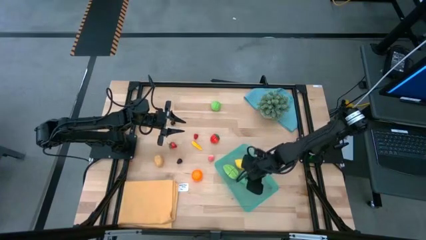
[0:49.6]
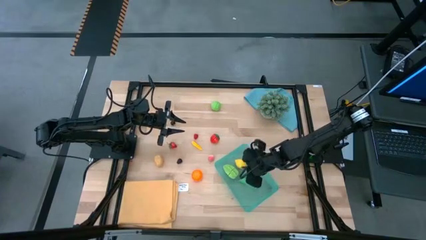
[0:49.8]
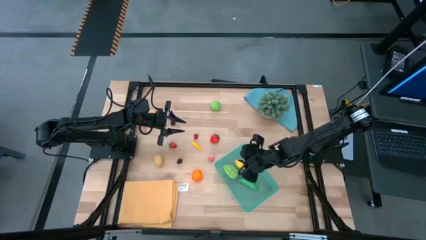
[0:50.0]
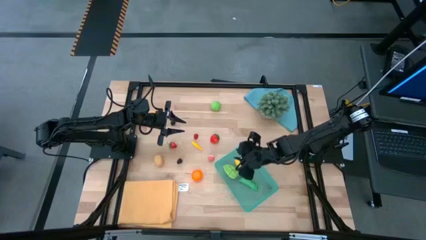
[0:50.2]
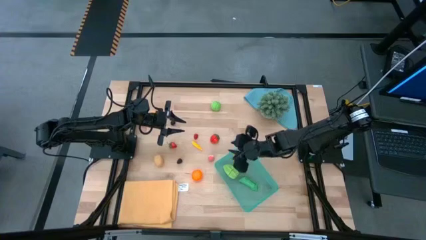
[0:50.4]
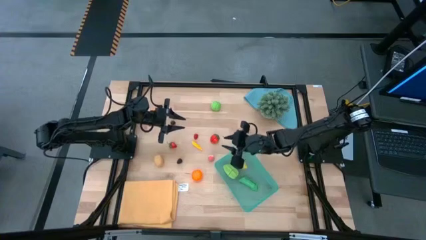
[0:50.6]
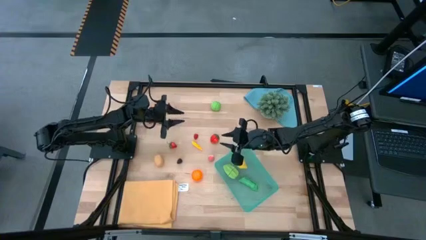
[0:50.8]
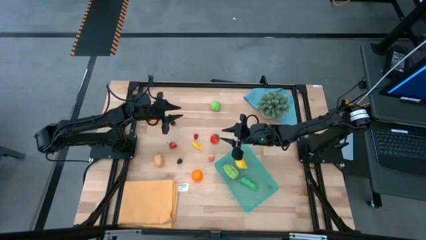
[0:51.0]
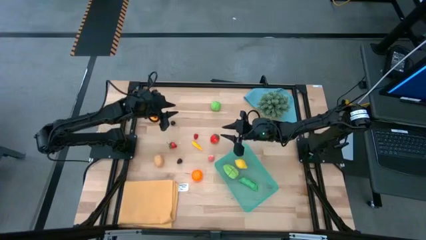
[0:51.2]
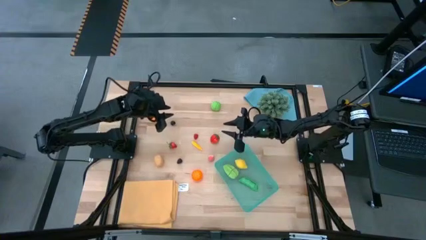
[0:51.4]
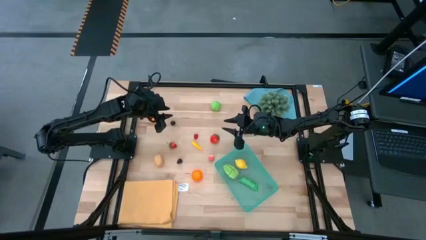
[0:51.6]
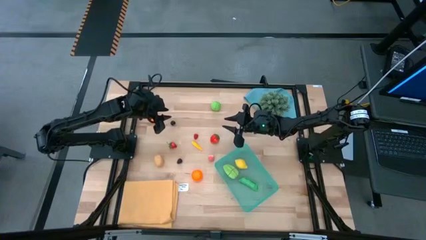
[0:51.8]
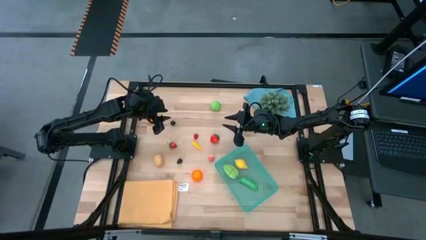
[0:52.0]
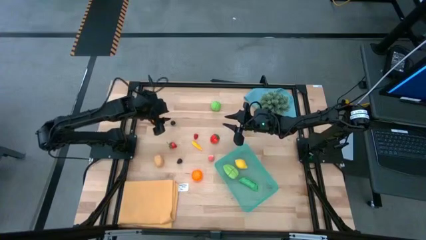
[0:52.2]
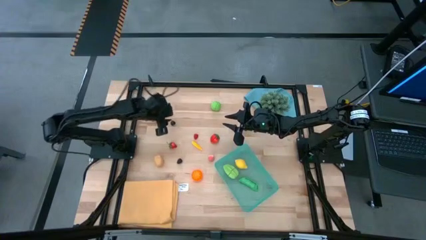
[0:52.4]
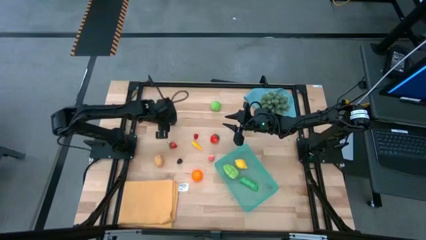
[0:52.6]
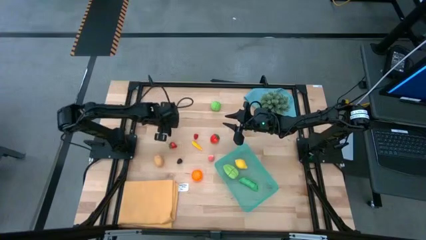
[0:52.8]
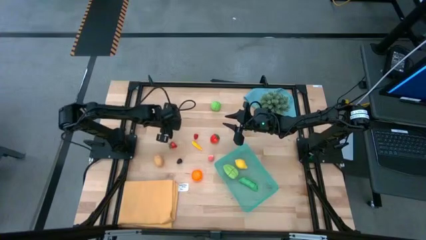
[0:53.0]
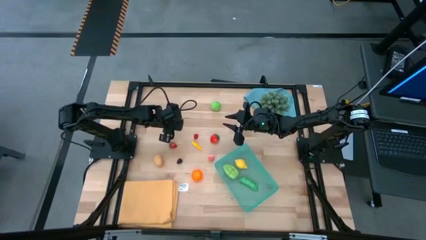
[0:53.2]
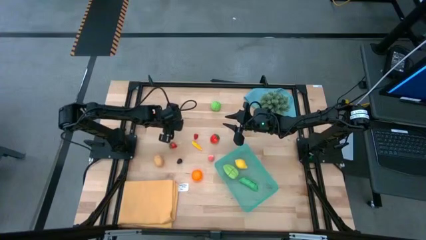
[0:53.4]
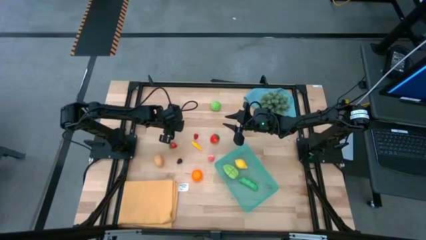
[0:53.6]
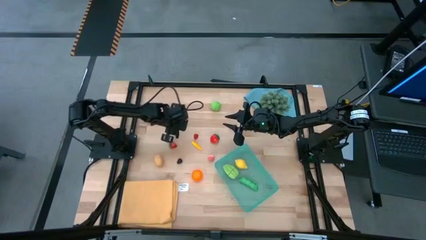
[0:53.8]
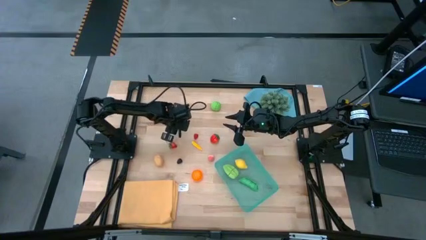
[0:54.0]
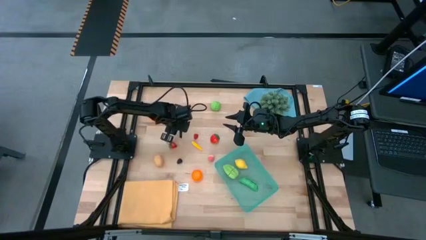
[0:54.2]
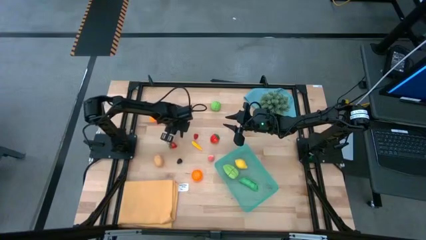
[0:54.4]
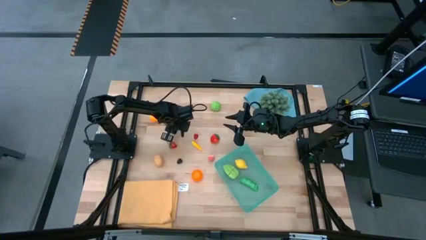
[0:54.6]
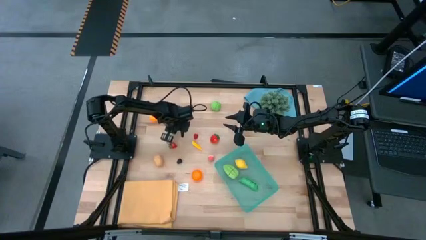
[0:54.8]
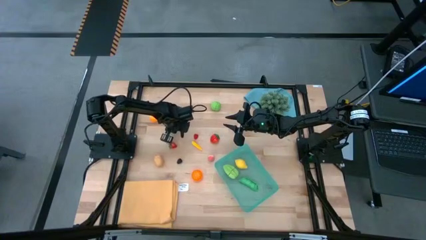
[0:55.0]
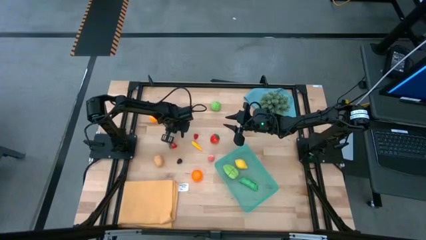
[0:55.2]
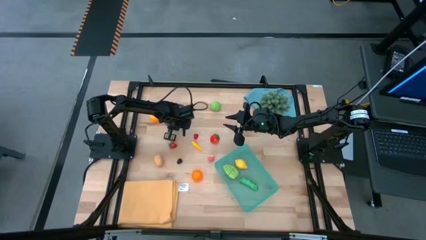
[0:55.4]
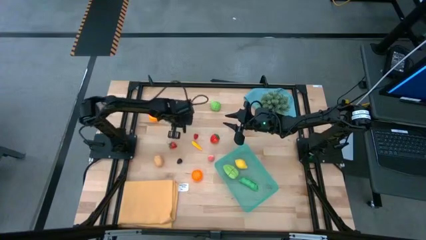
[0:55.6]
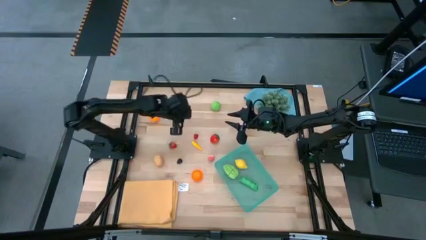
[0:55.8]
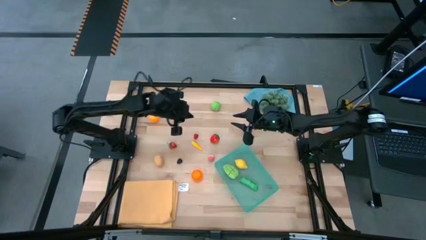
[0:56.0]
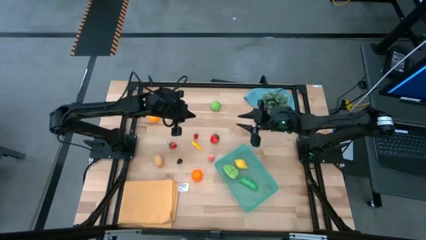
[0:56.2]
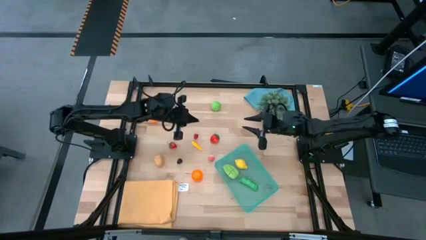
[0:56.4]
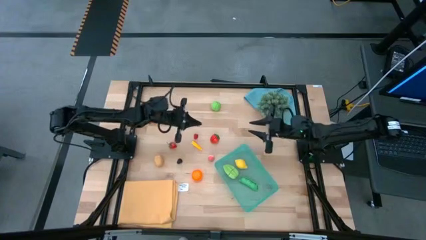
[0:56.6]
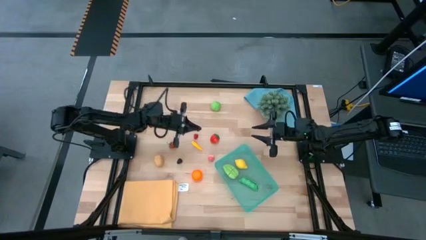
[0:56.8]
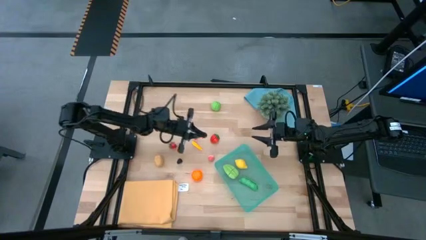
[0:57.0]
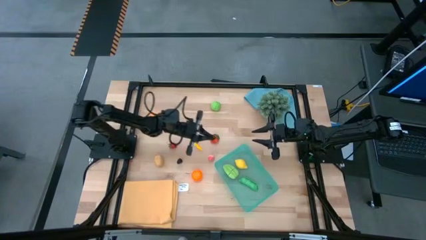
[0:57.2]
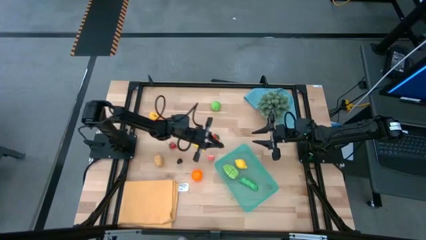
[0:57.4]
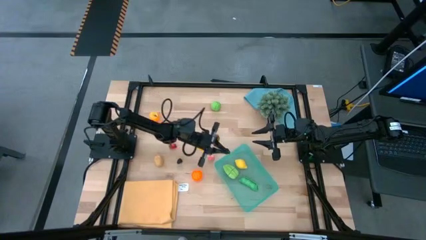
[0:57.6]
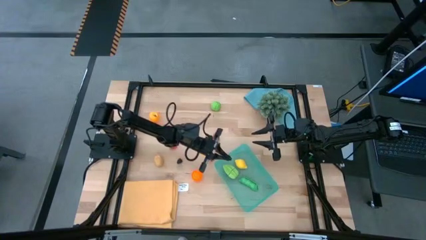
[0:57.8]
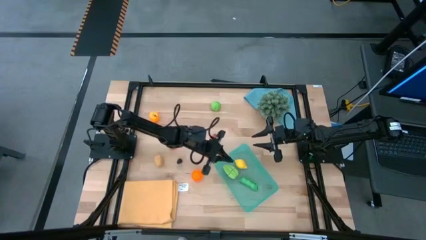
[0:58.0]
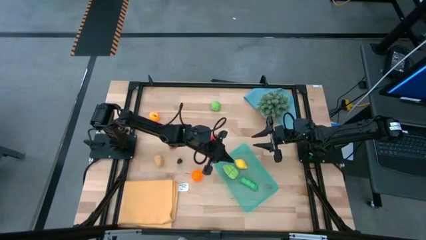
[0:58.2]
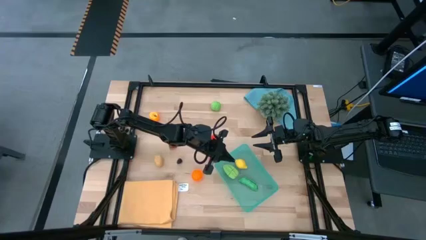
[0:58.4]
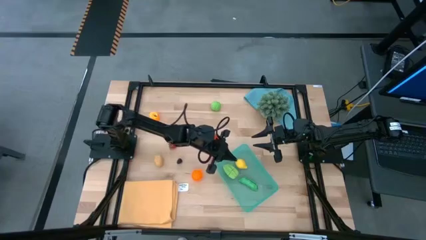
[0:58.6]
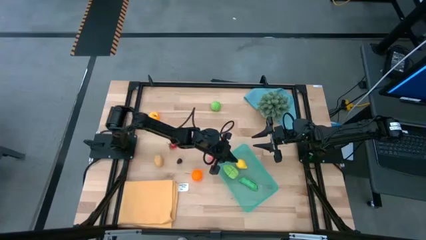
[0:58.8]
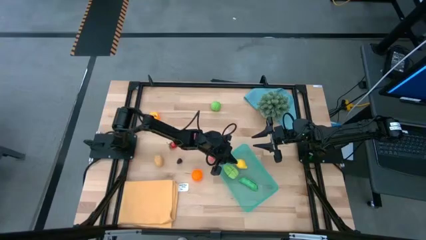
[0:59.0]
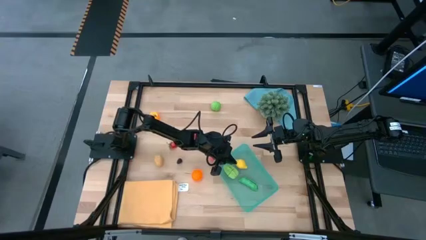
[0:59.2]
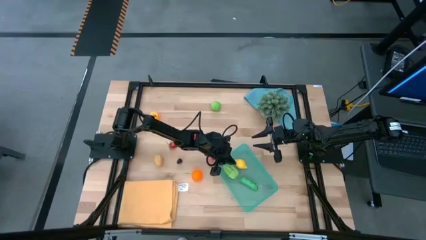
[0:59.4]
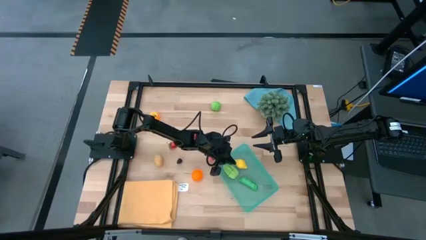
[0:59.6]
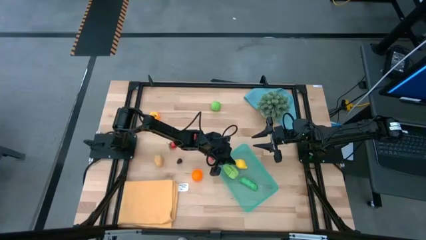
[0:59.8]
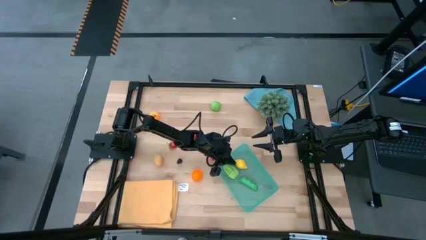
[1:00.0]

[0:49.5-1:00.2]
Task: Pick and placing Produce into tupperware
Put the black cherry into the green bin

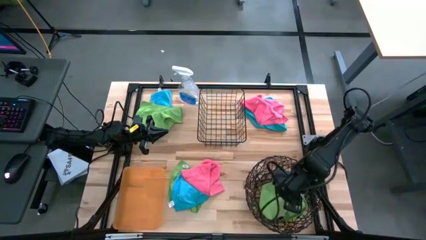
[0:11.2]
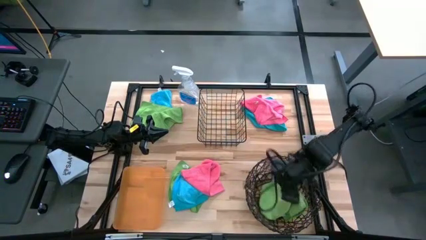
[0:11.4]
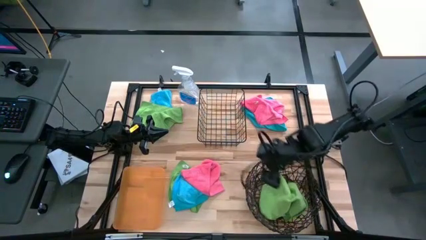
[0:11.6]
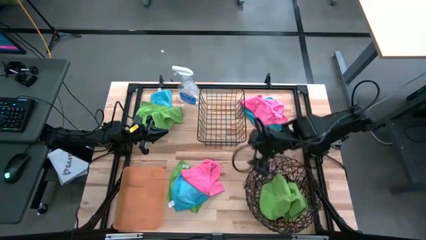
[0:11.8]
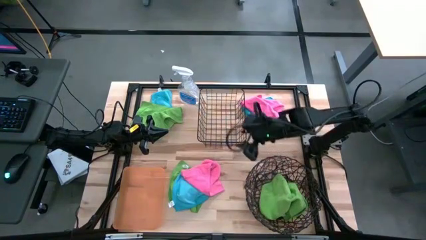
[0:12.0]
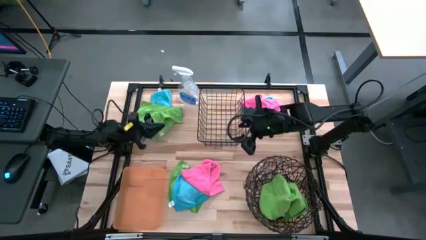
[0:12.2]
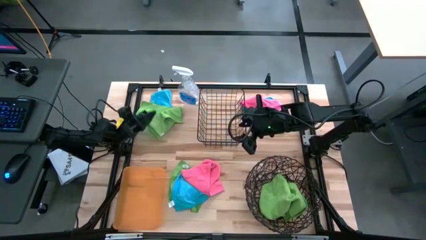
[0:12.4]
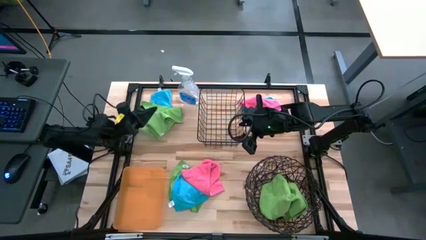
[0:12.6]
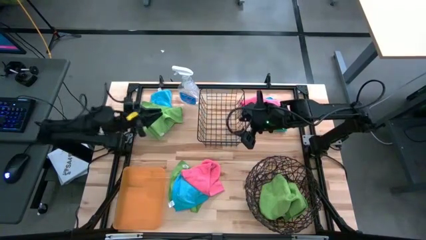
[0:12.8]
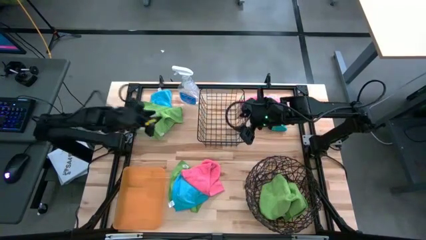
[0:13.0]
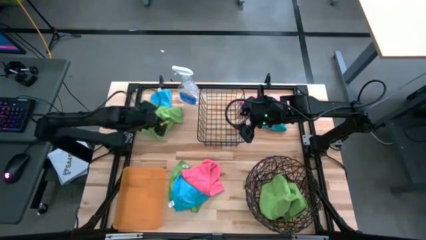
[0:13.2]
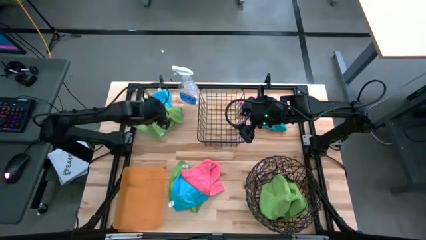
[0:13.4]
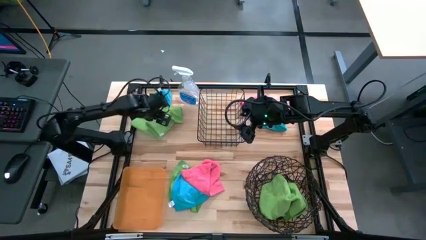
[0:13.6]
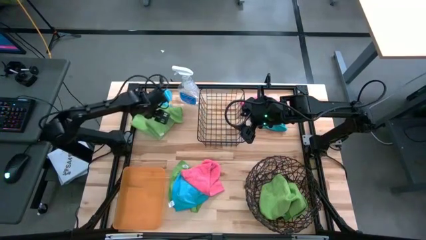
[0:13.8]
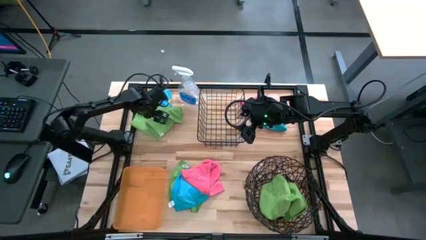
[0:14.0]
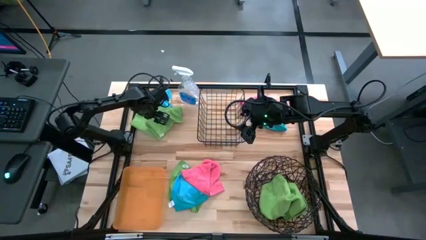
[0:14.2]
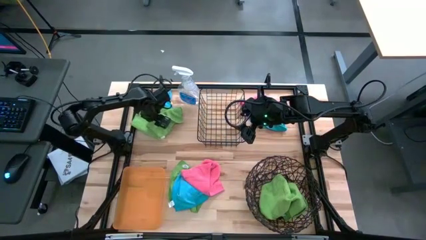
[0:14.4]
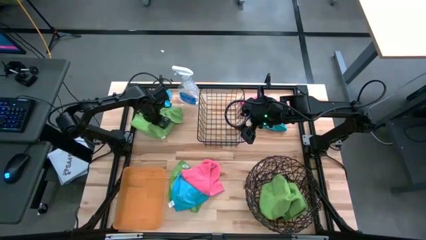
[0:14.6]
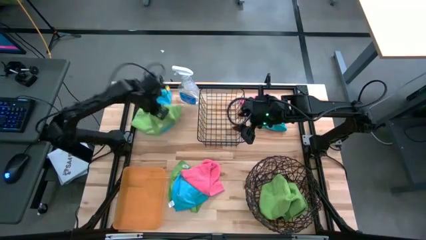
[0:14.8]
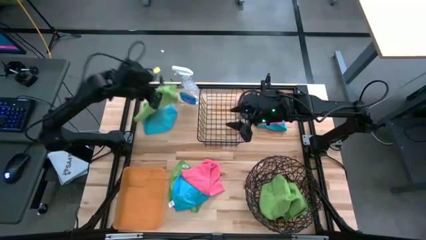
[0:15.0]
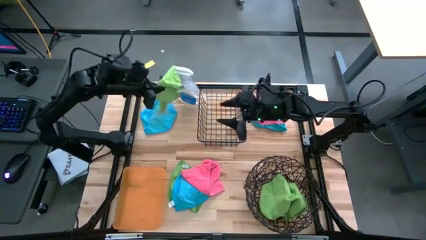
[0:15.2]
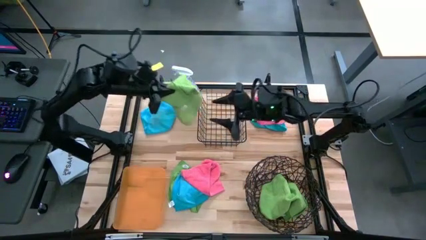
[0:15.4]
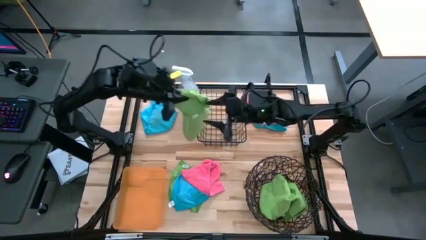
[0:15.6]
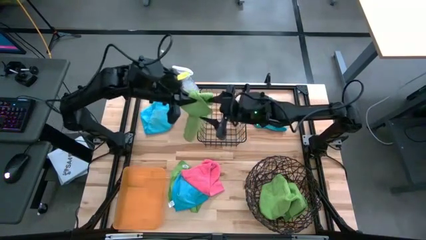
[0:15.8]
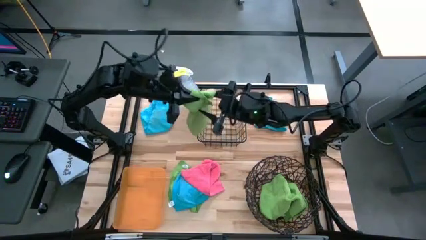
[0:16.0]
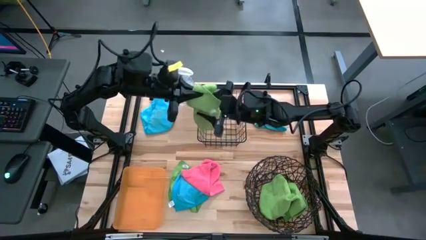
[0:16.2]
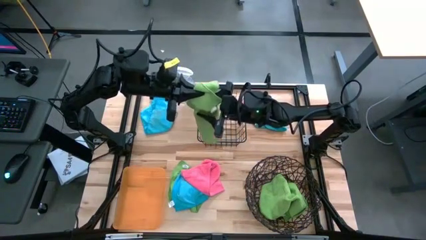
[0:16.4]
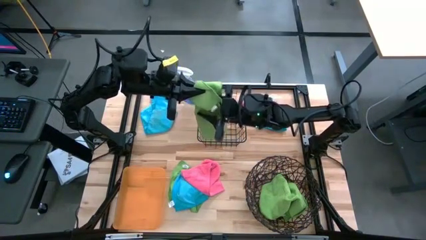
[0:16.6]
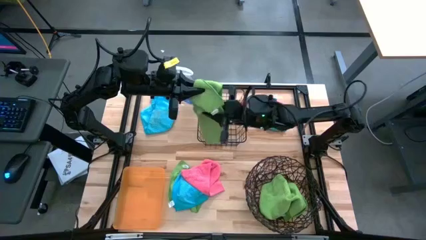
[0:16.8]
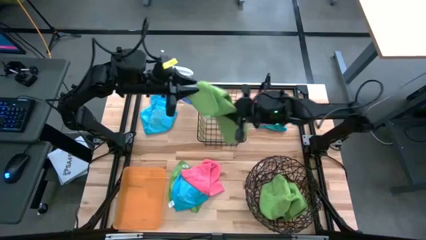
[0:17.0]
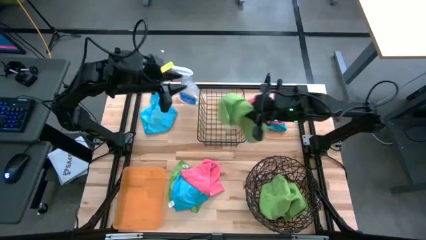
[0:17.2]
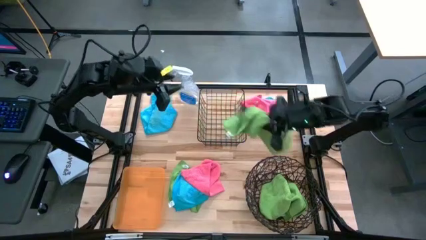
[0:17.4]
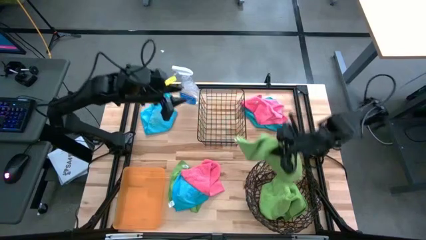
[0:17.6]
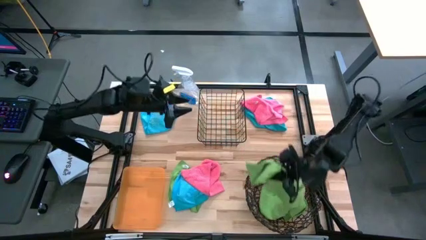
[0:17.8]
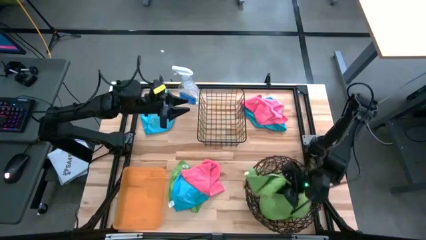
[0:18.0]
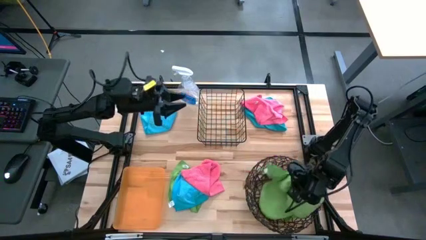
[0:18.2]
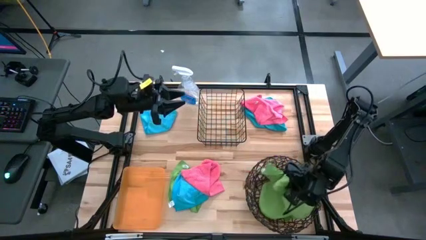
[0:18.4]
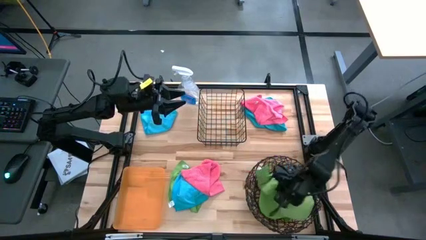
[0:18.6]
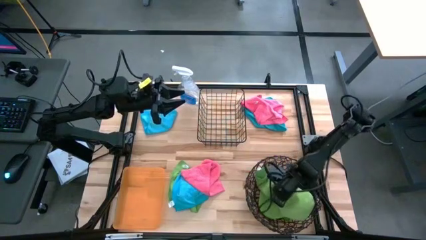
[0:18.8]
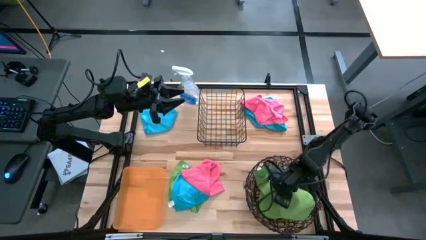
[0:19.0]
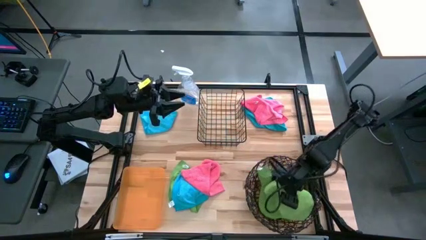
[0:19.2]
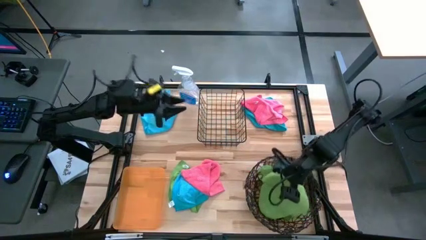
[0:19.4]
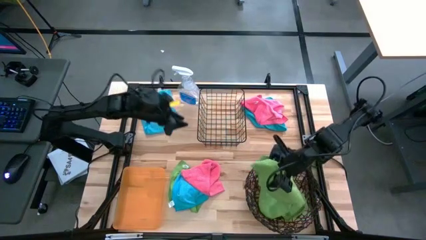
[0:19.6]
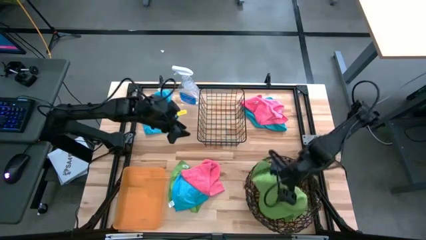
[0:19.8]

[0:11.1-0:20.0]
Task: Sort microfiber towel by color & place in baskets
Put the top green towel into the round wire basket
